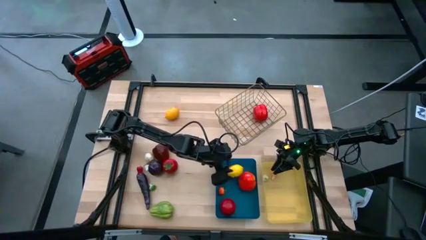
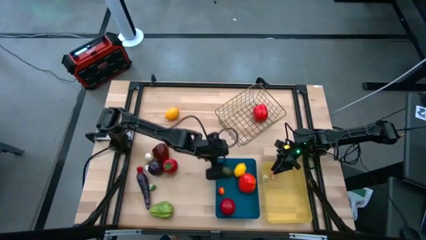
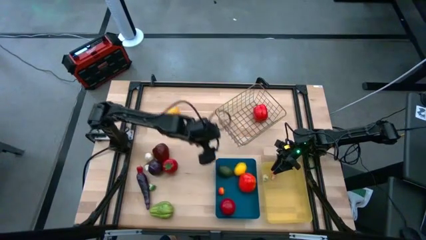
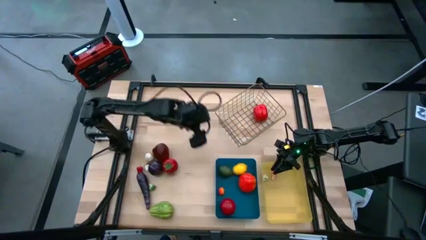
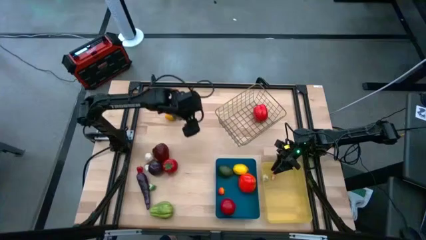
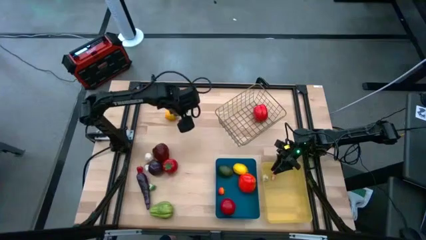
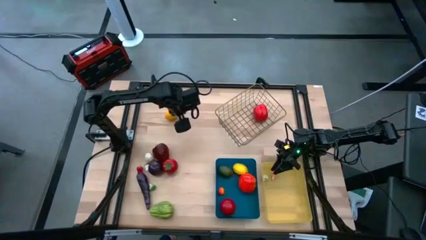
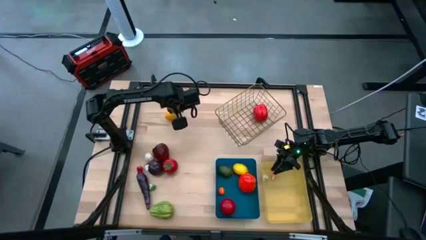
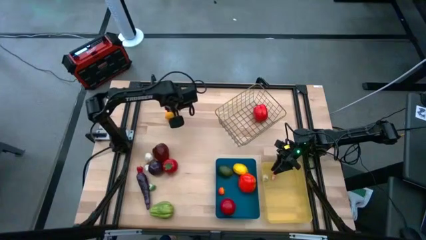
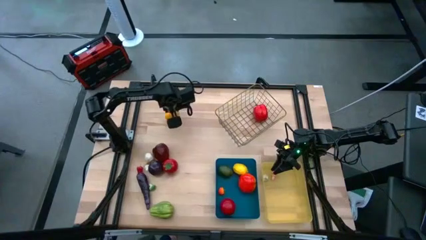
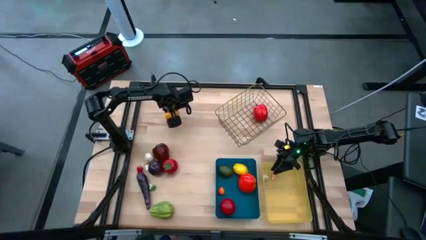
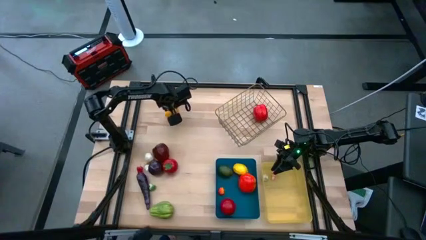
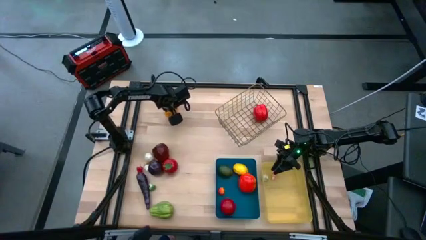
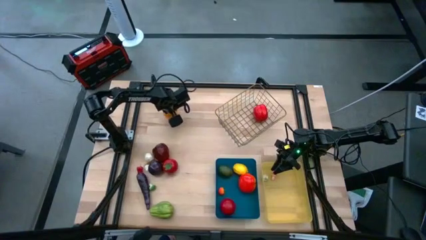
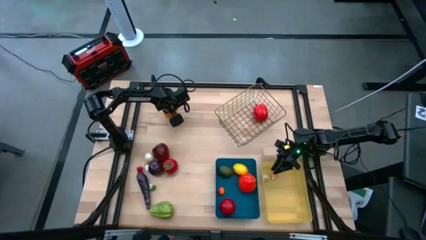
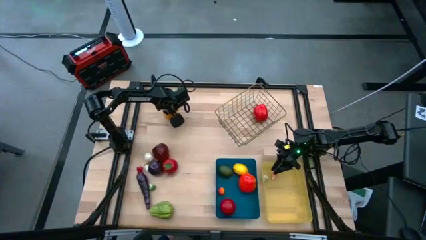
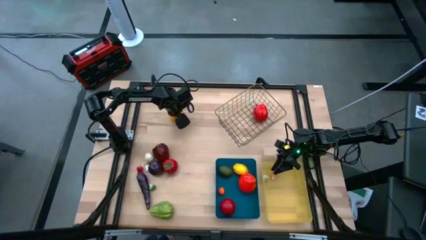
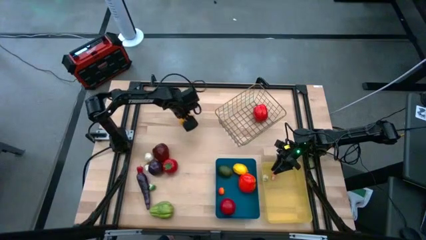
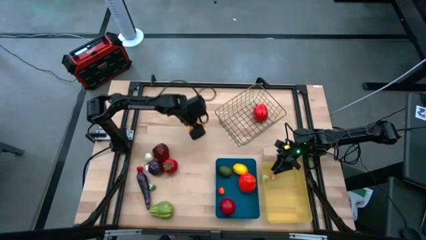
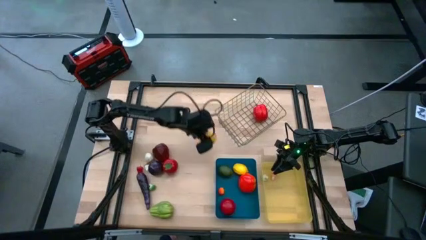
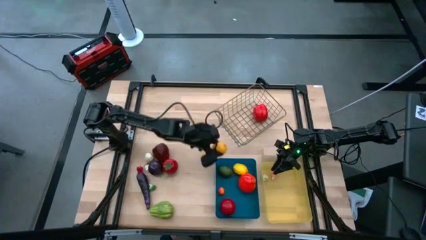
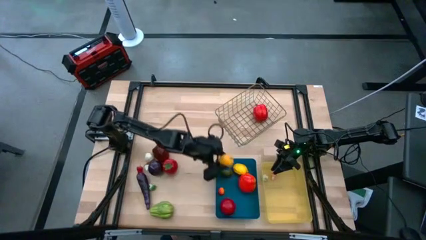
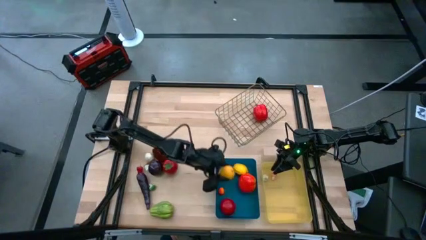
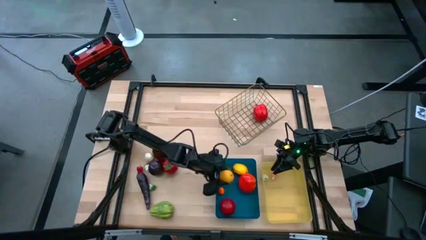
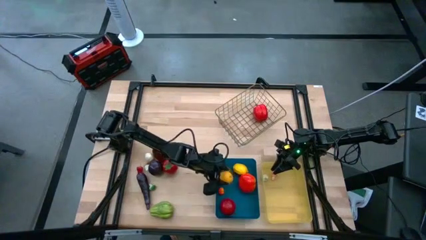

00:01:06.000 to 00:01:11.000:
Task: Sort produce into baskets
Put the yellow lemon into the blue bin

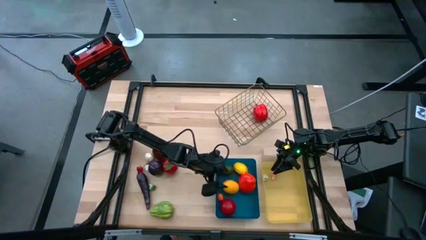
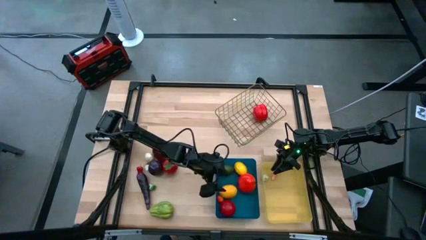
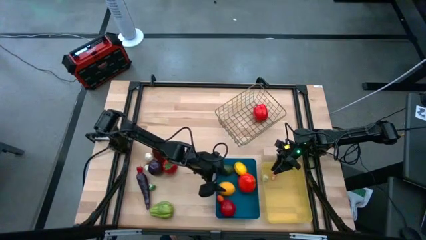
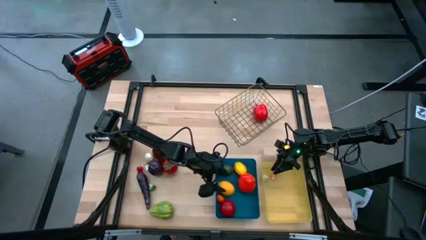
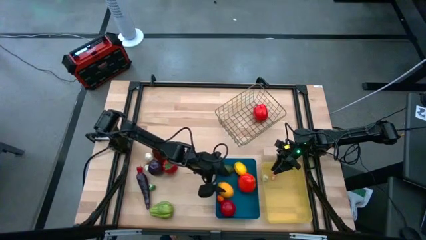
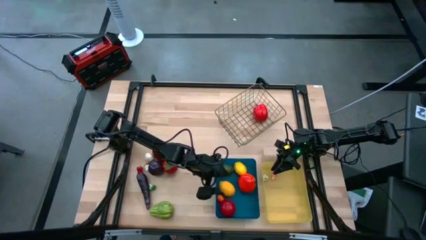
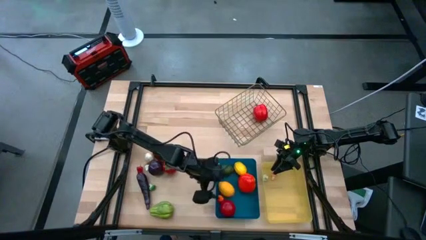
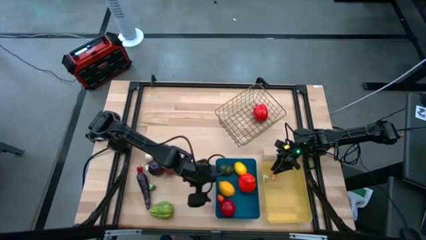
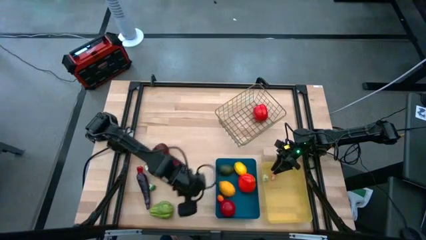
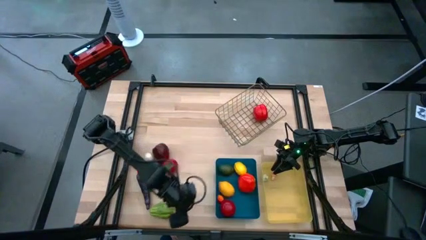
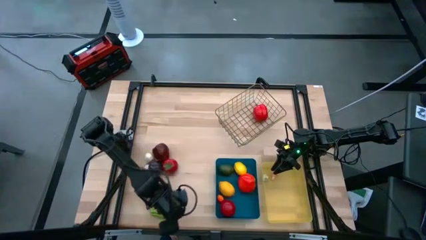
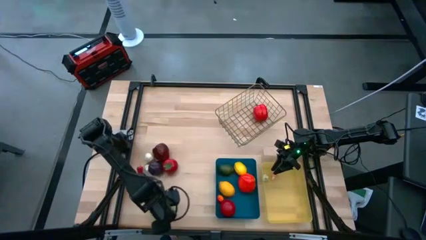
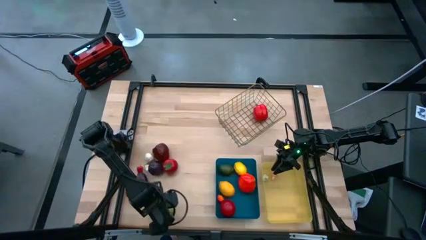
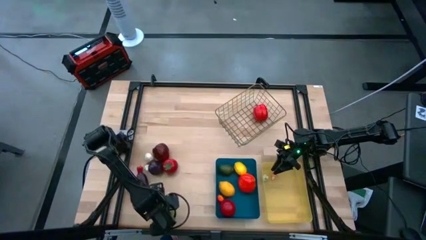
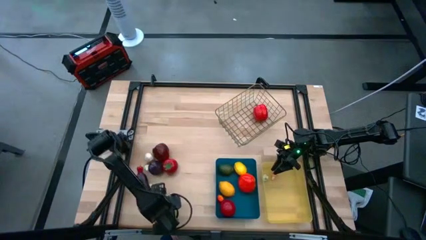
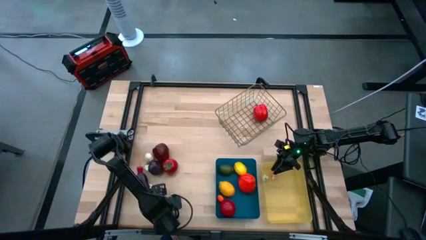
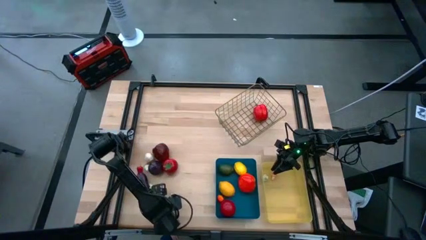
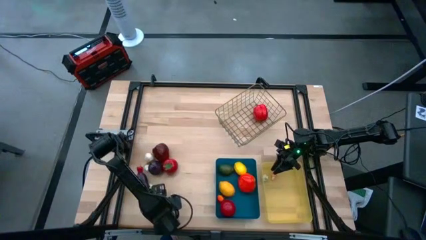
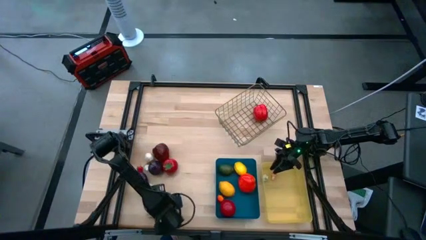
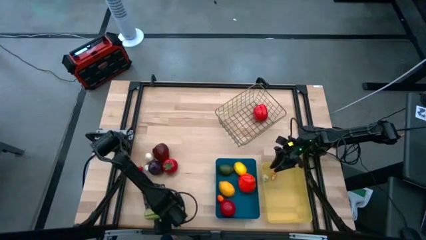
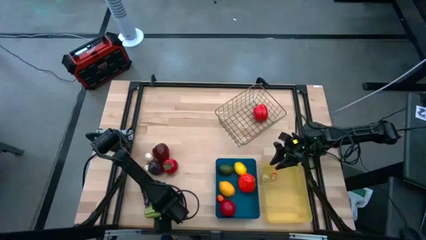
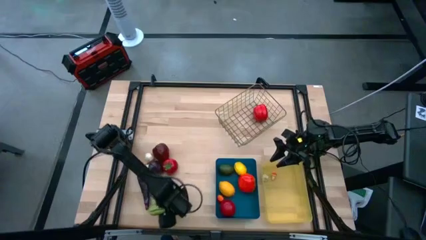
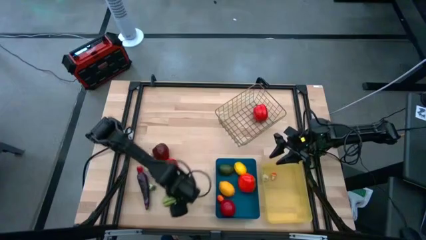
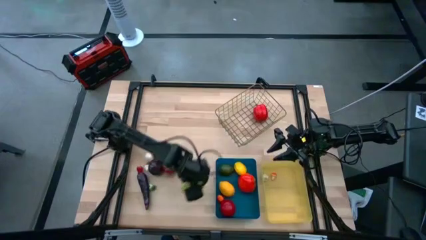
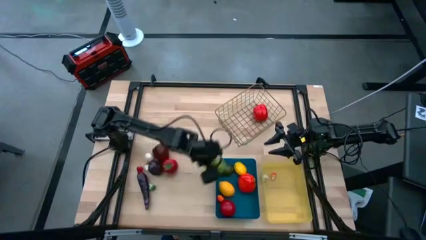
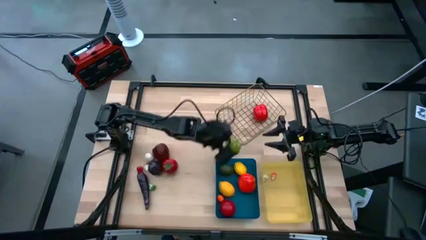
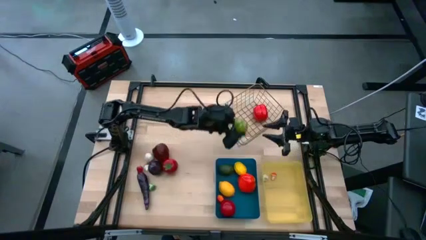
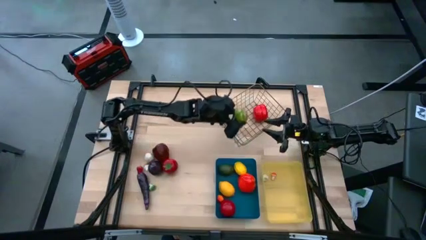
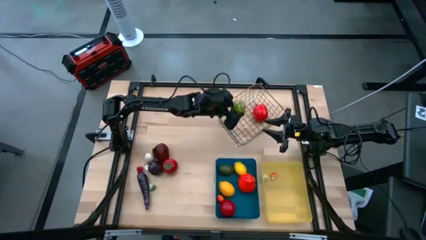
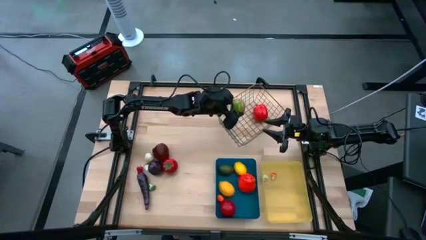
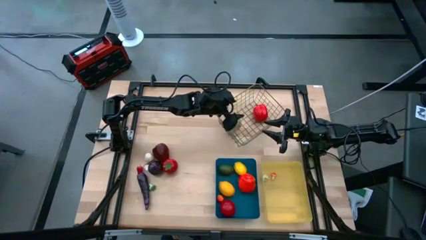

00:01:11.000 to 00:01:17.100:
Put the green chayote into the brown wire basket

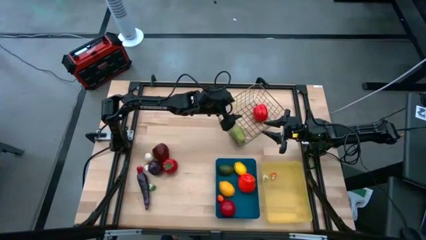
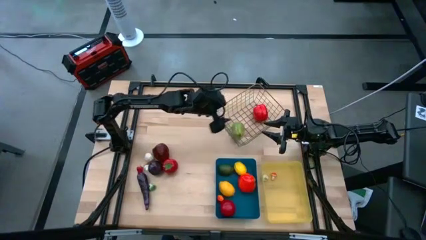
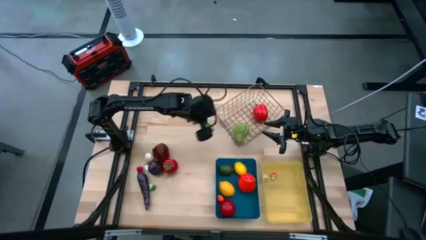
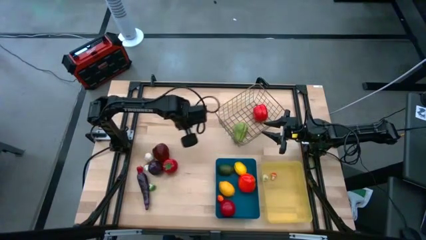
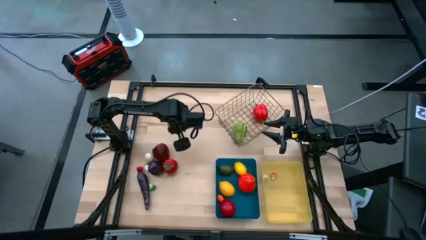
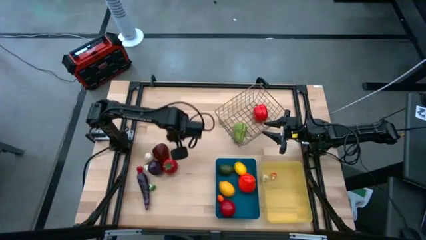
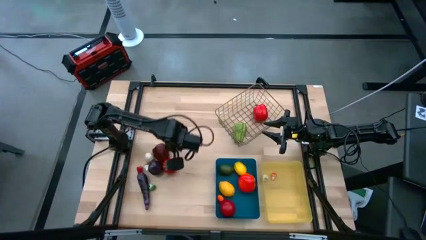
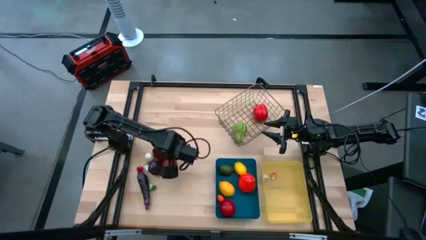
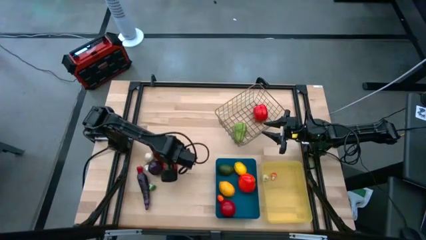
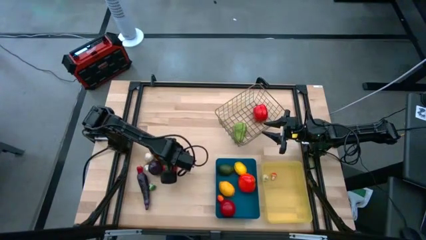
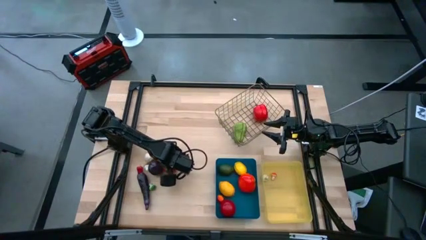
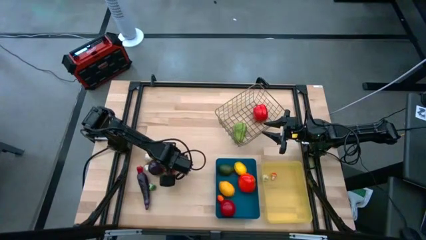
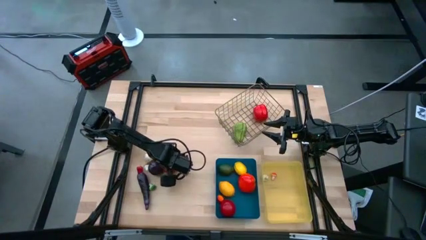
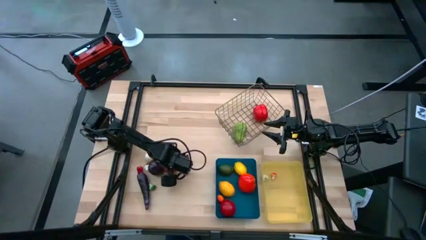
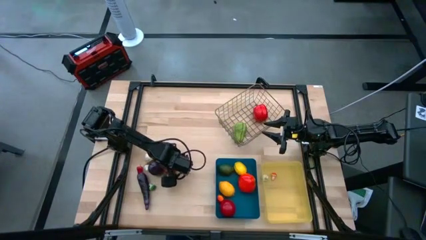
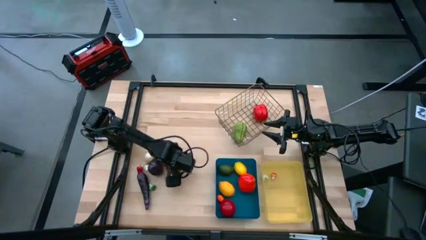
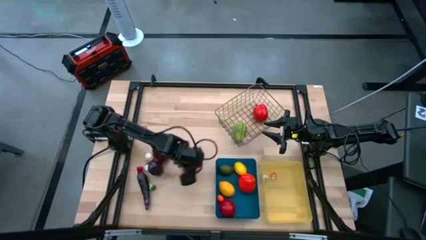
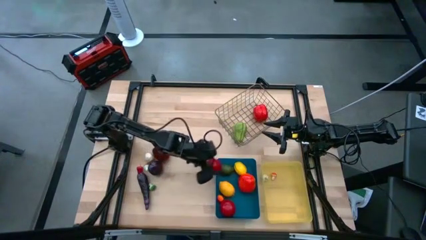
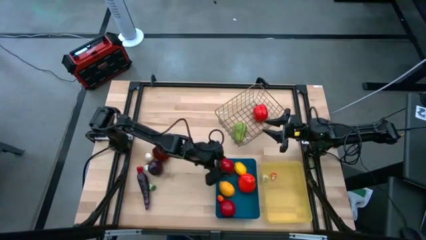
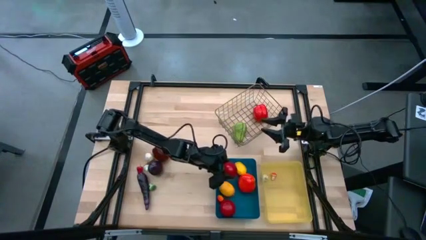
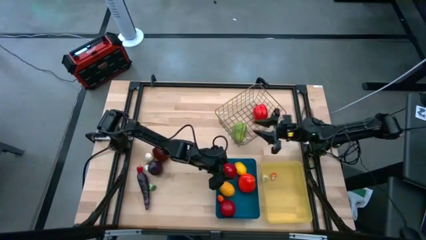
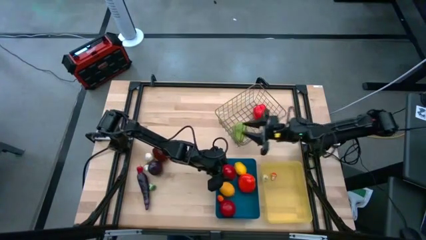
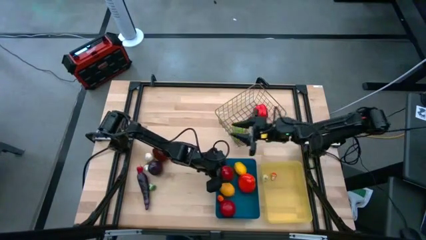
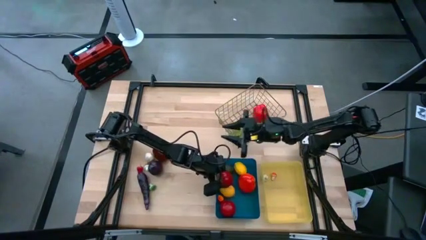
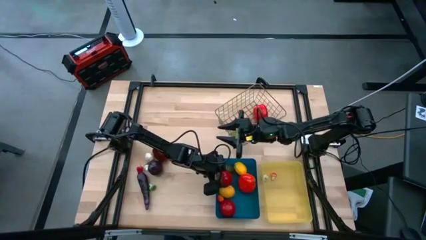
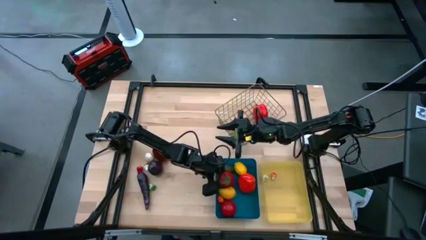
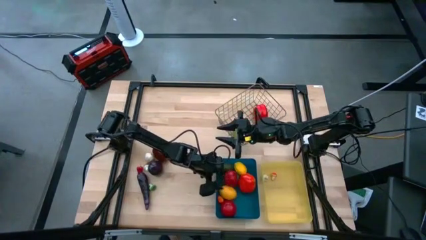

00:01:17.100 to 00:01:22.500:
Put the red tomato into the blue bin
